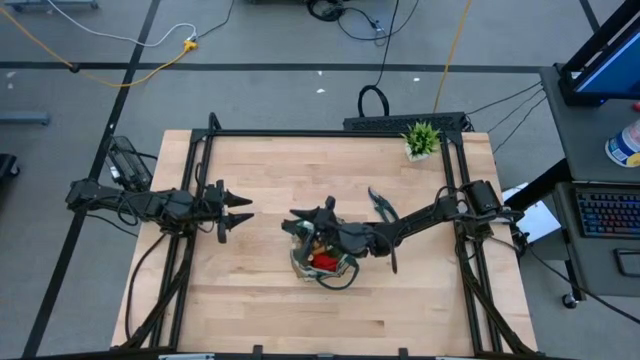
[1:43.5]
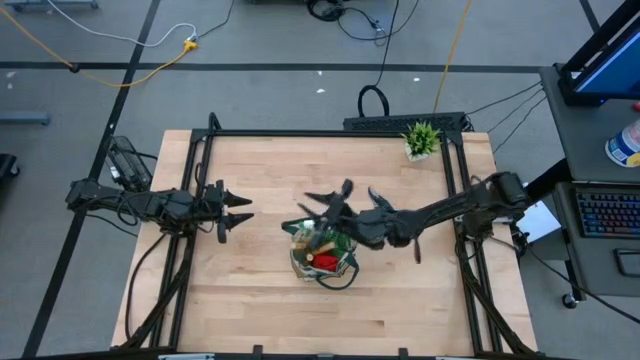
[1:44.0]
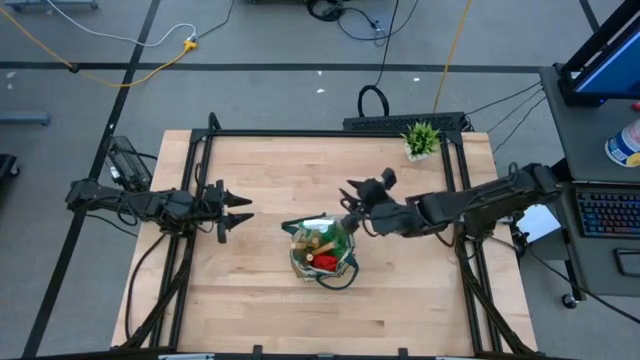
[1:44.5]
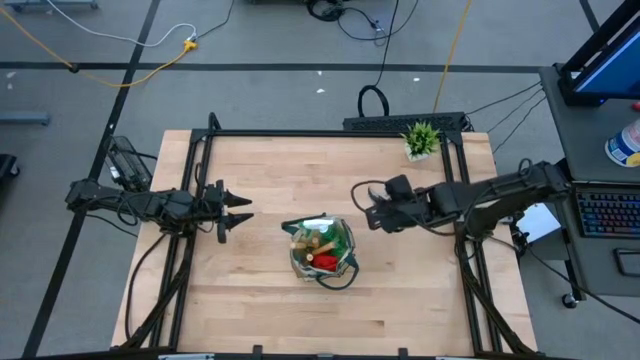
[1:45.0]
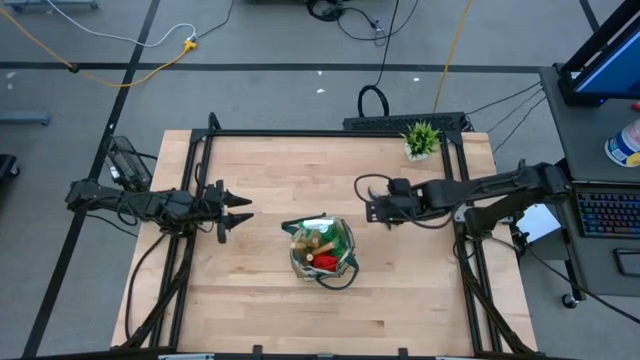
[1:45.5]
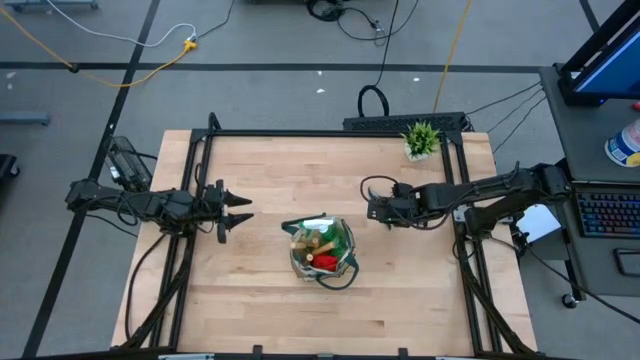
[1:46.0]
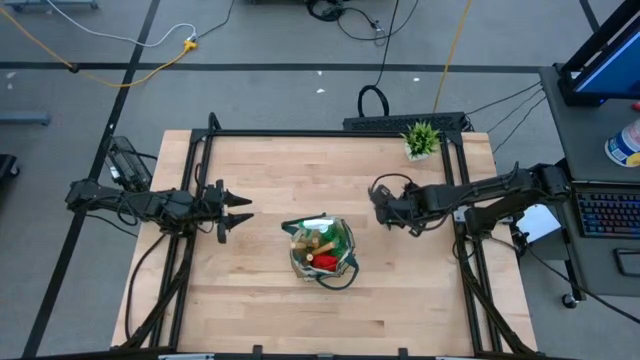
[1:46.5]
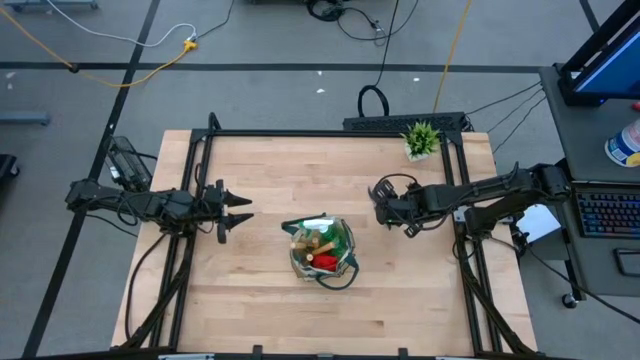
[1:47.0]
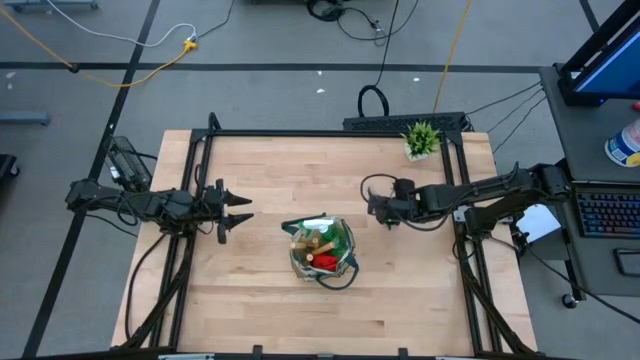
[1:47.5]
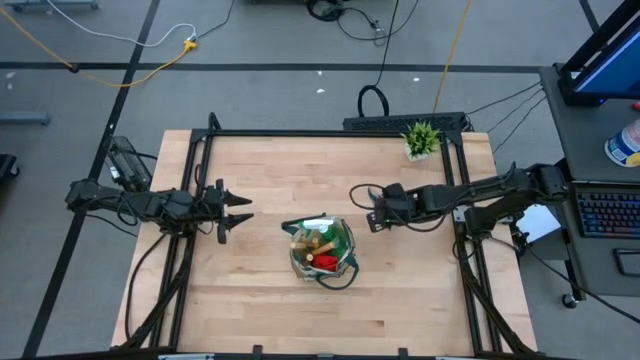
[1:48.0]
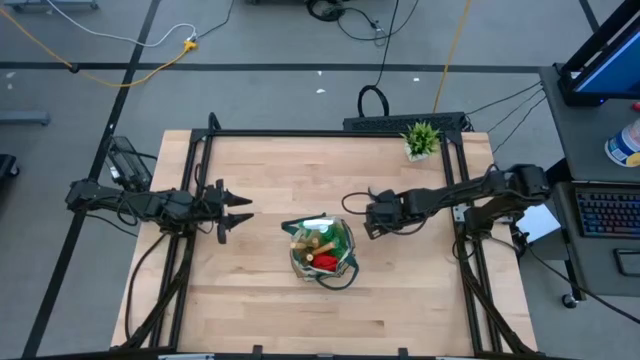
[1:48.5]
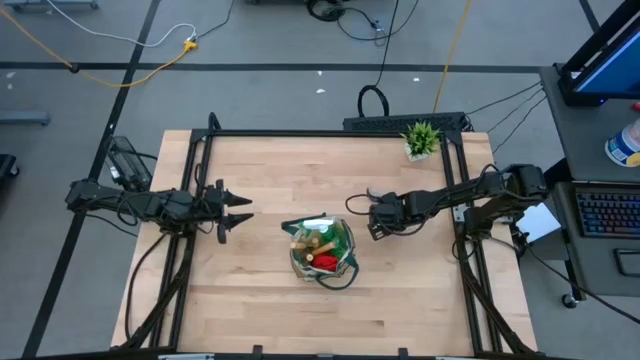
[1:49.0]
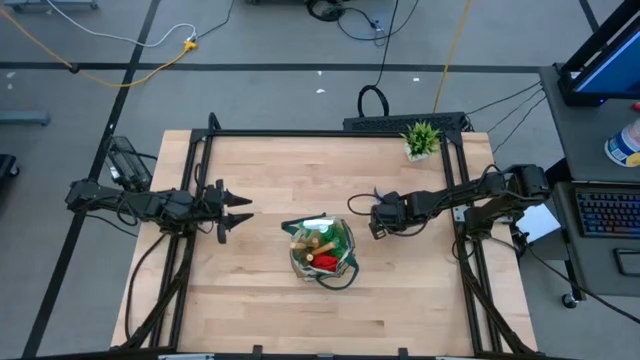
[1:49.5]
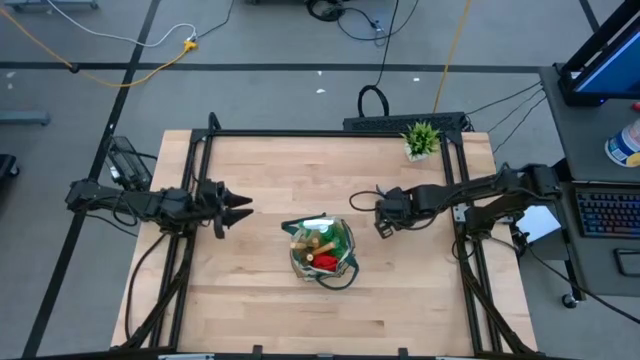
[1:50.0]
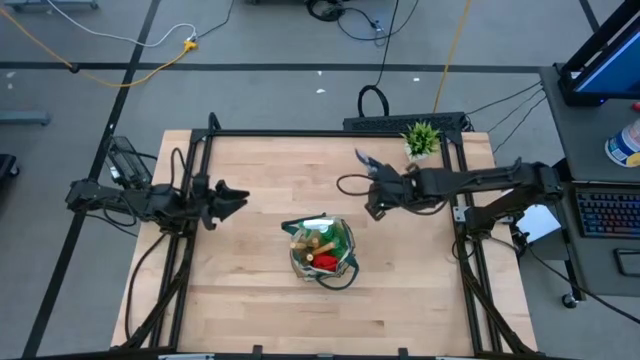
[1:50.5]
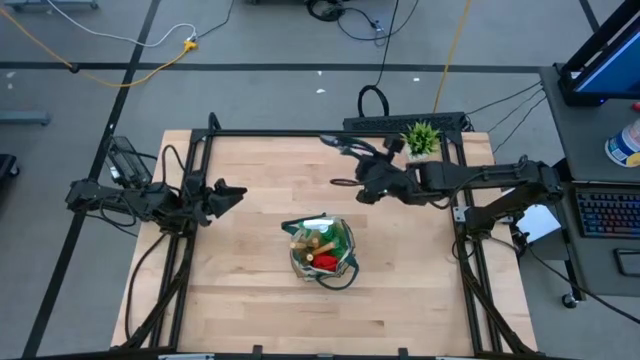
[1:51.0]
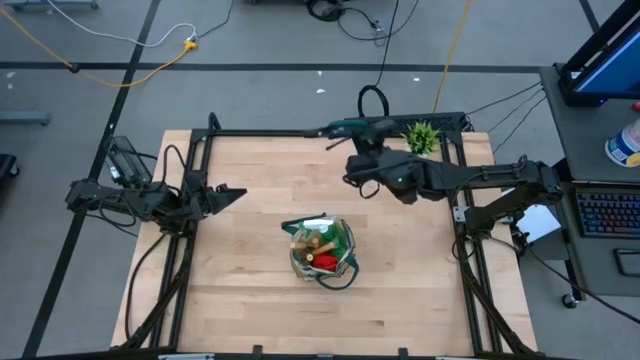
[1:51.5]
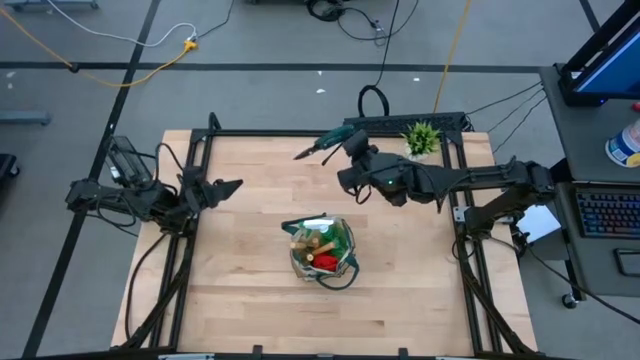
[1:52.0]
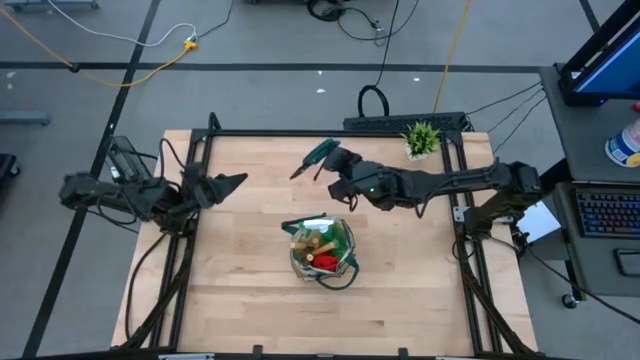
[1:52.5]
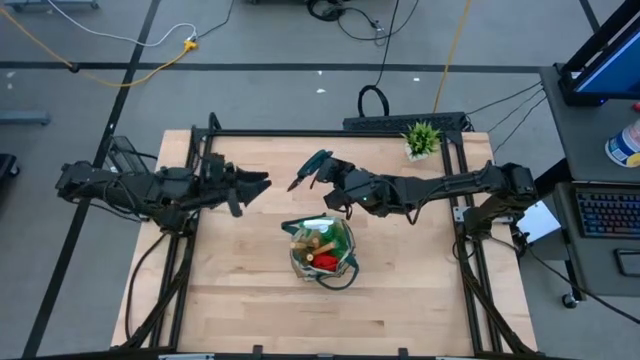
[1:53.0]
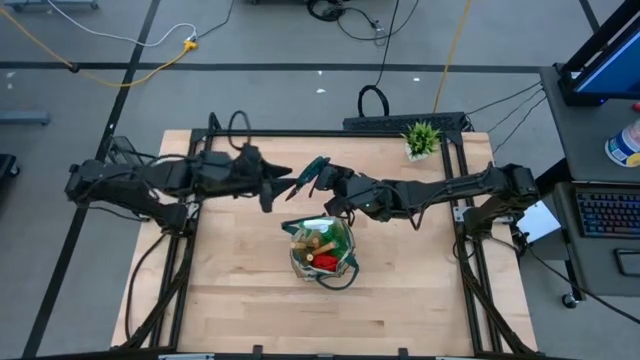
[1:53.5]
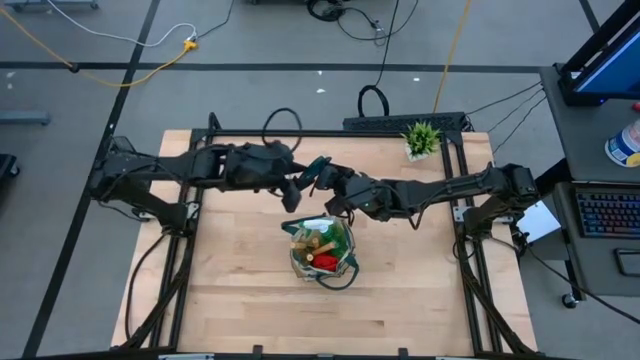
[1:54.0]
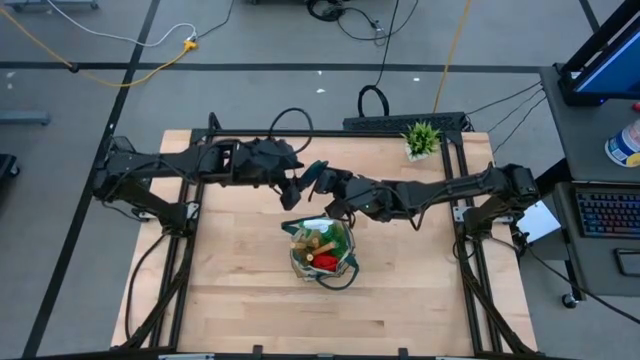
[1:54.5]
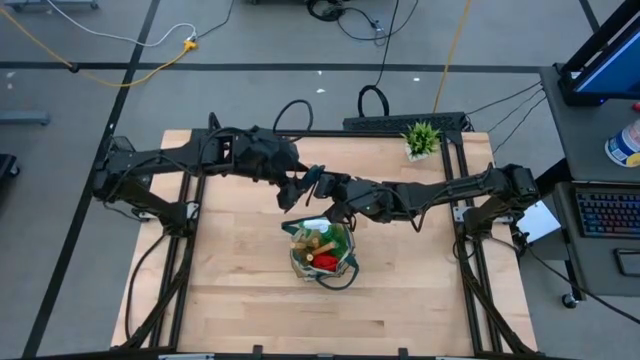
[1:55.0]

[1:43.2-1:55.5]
Task: Pick & Place Garden tools in Gardening bag
Put the green shear scissors into the gardening bag

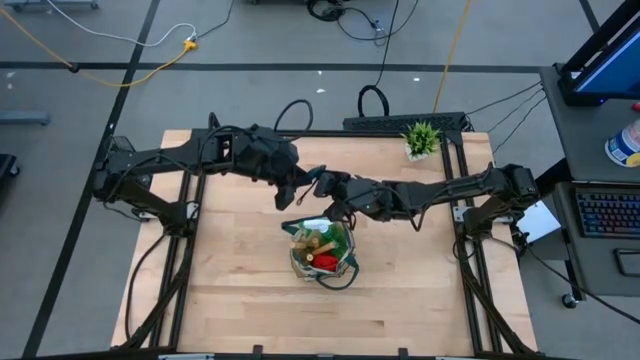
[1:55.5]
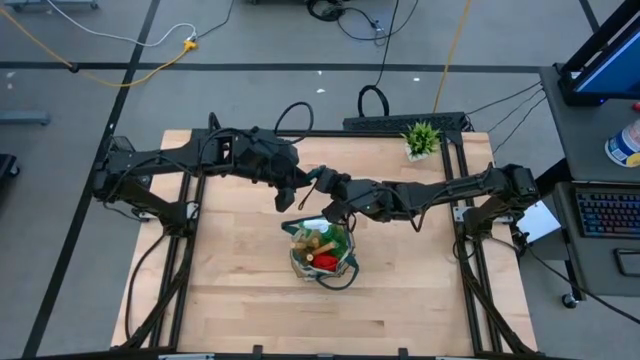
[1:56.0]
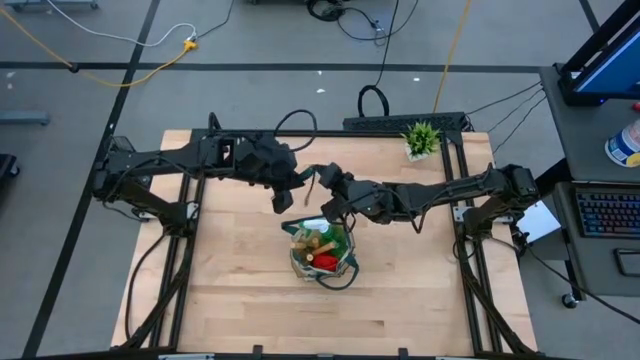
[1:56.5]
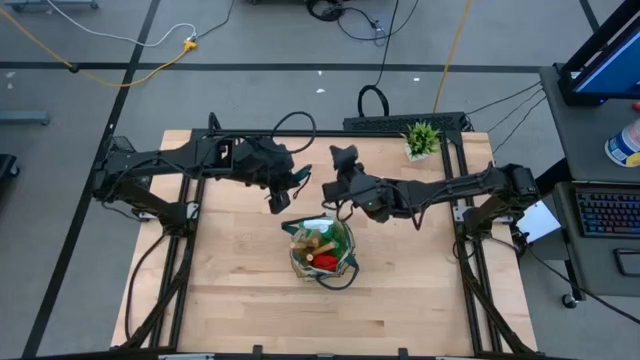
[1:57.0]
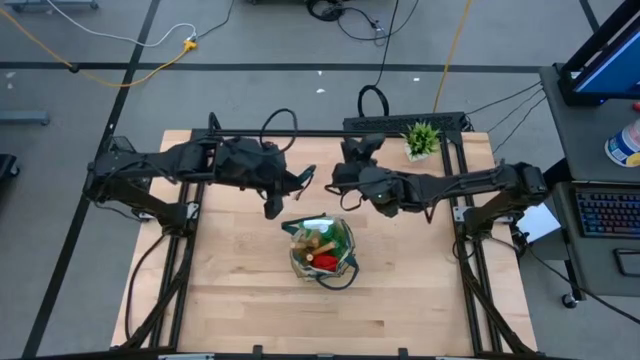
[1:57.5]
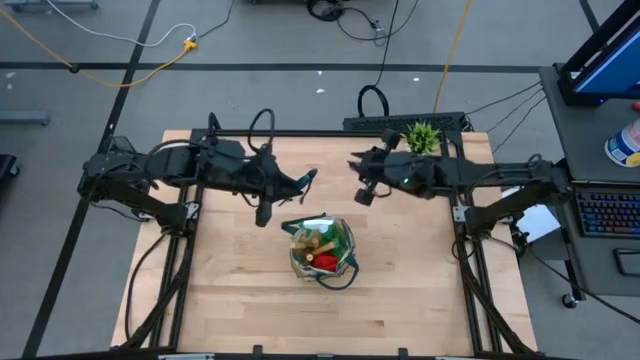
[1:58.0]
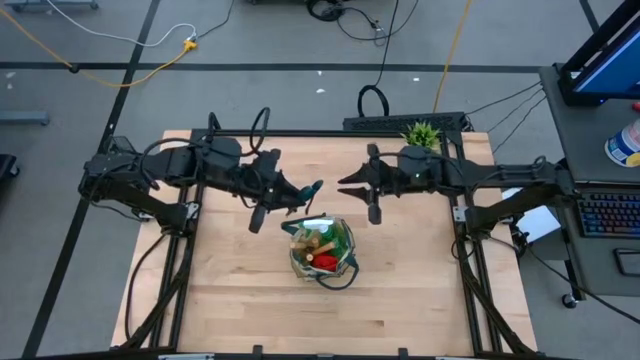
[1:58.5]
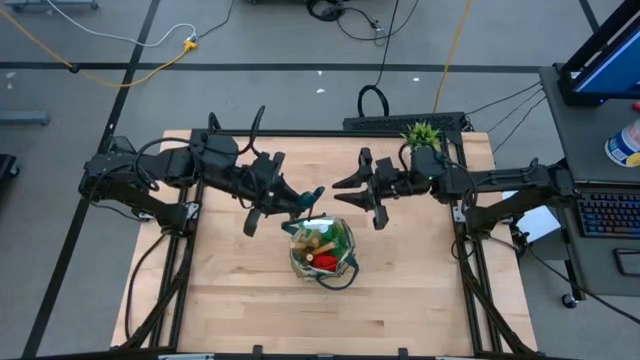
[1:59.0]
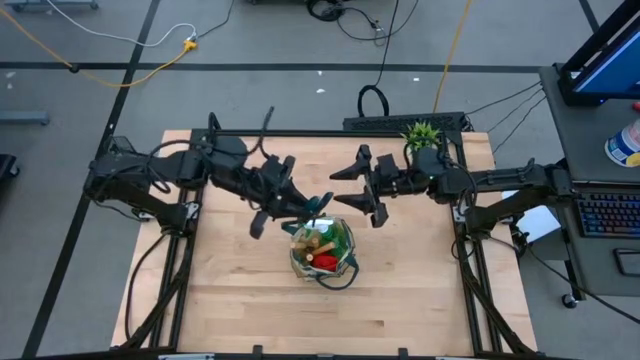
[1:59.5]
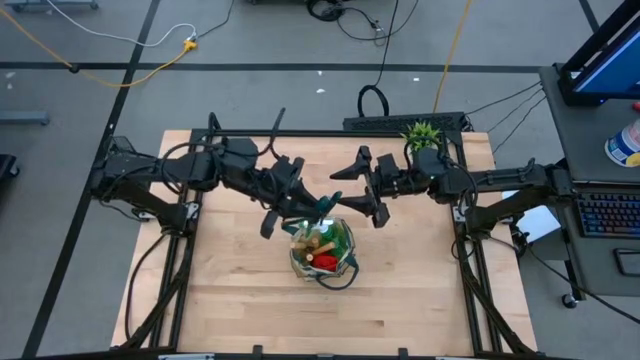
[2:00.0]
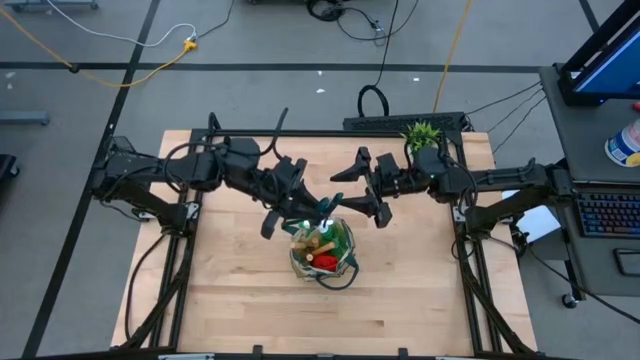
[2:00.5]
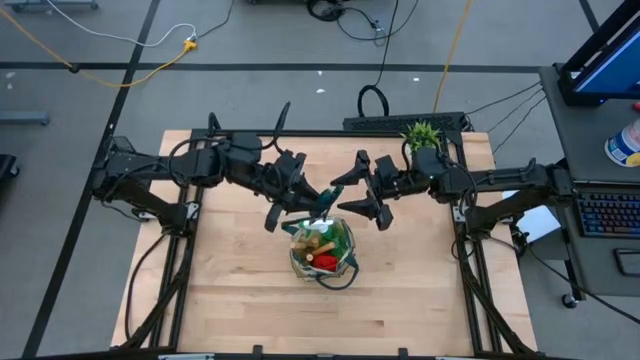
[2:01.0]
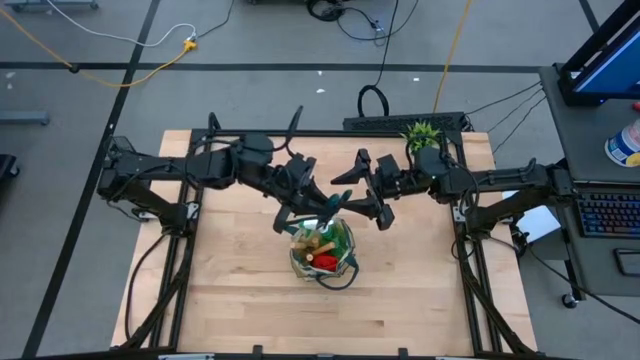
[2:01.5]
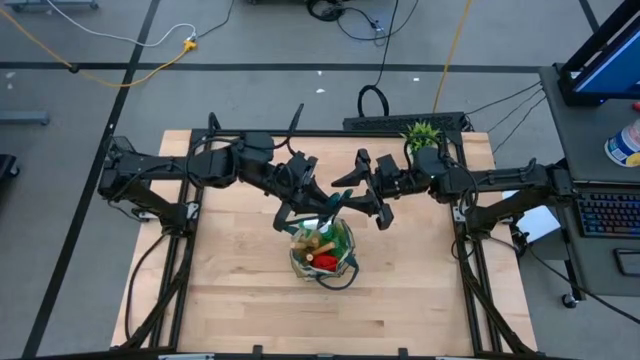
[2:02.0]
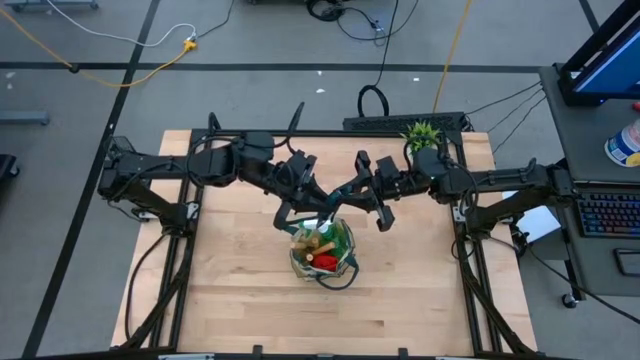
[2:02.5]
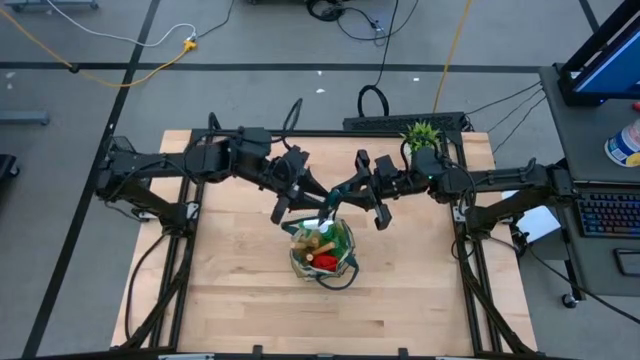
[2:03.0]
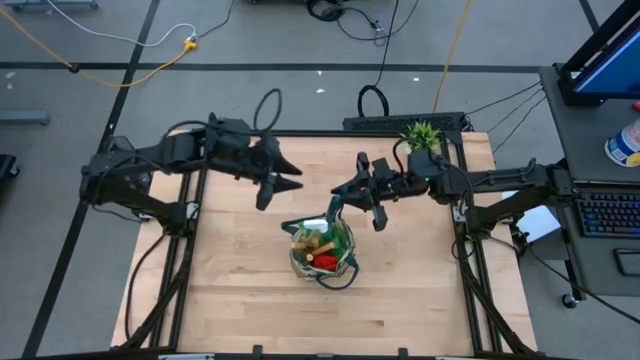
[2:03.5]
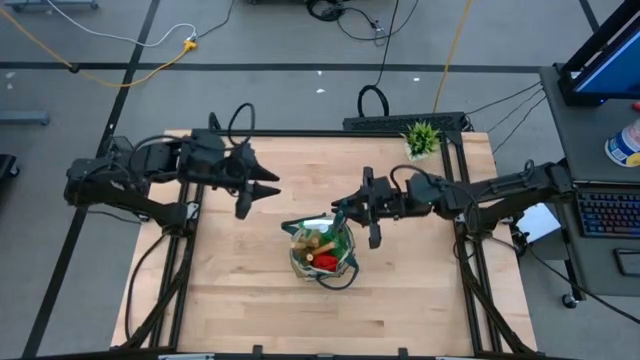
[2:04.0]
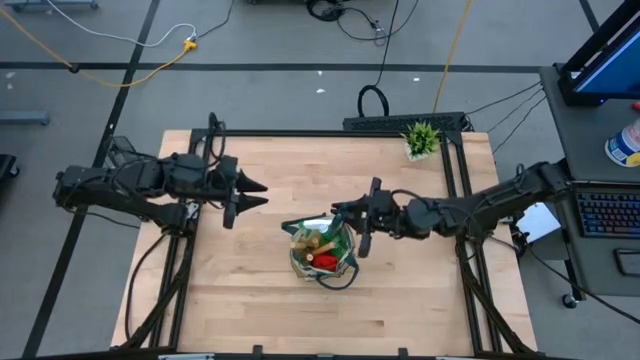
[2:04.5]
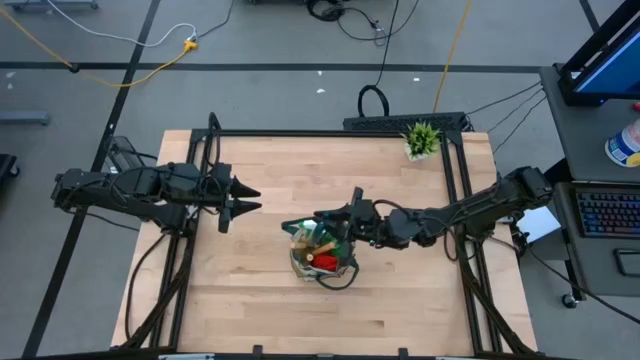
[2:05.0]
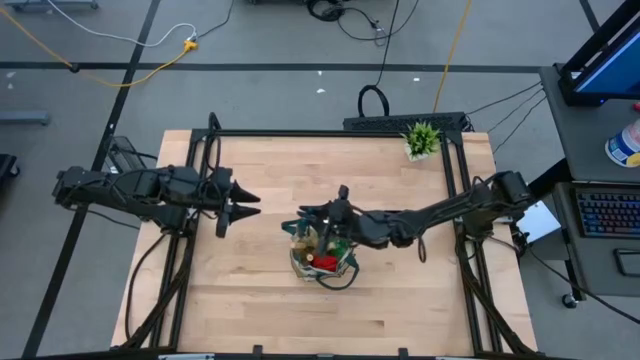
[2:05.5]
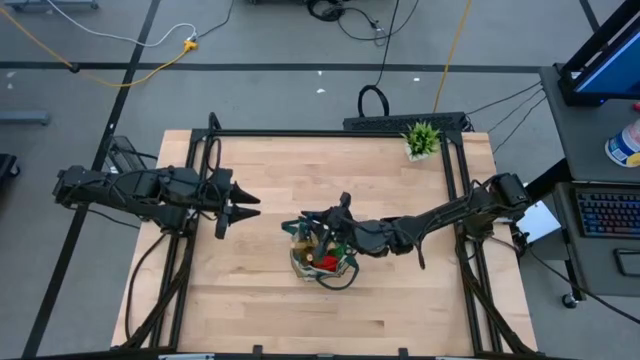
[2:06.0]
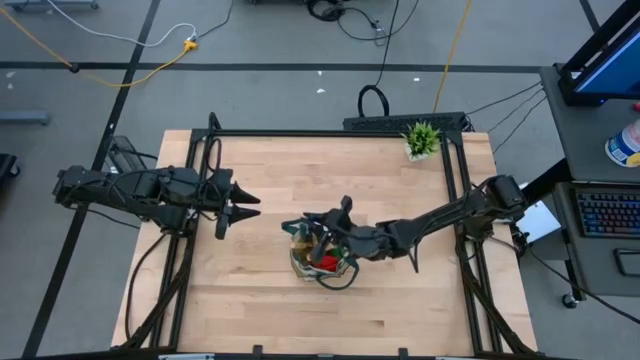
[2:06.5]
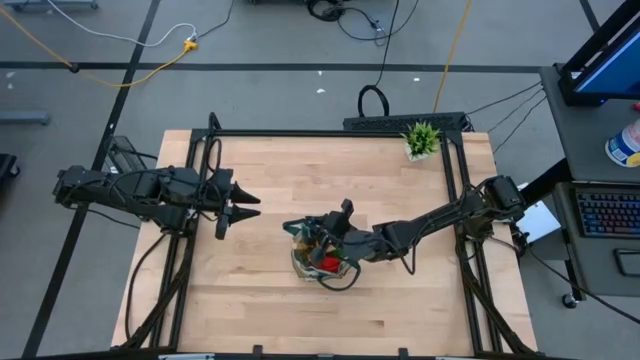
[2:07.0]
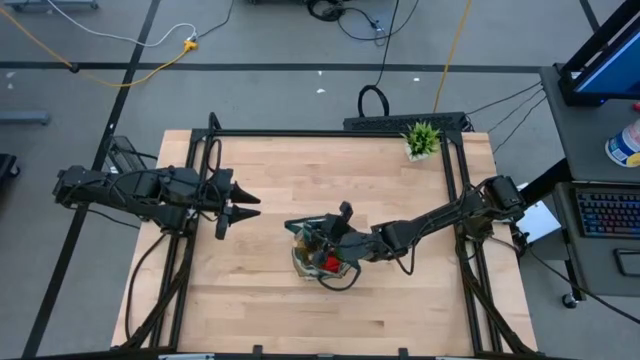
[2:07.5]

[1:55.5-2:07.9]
Put the green shear scissors into the gardening bag
